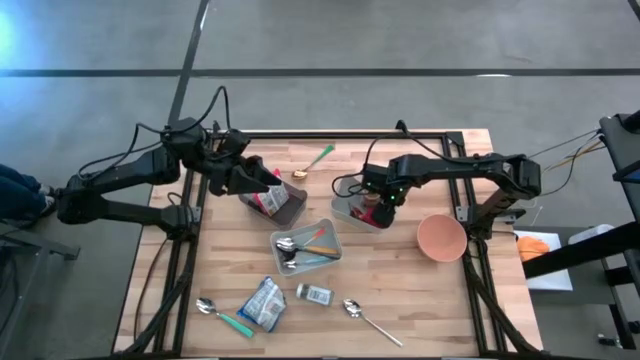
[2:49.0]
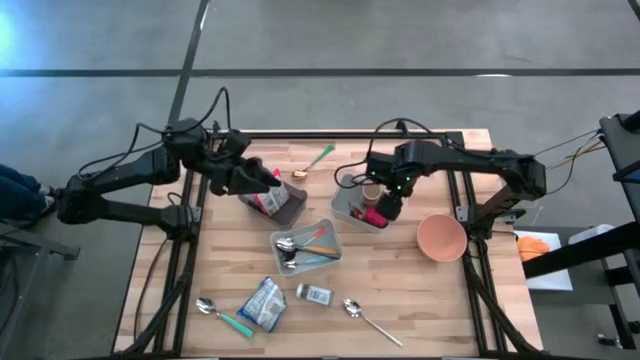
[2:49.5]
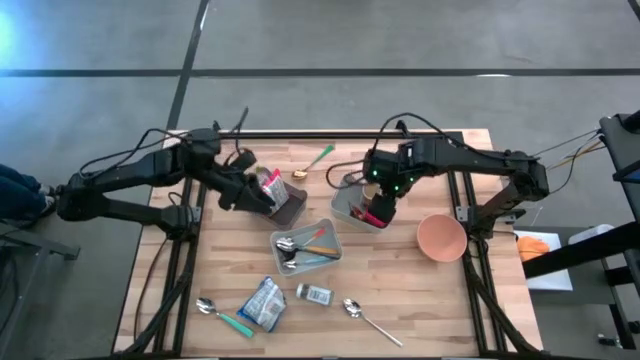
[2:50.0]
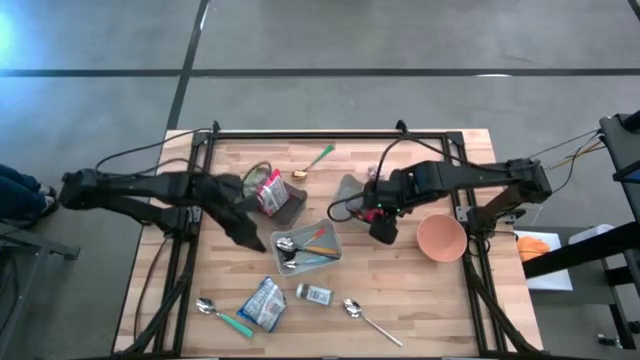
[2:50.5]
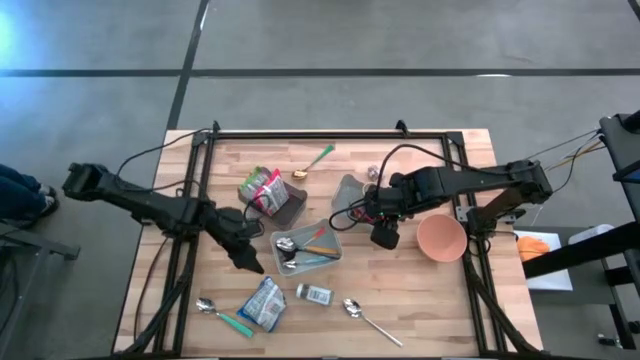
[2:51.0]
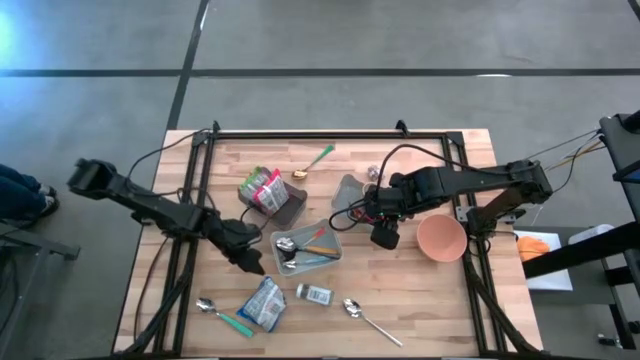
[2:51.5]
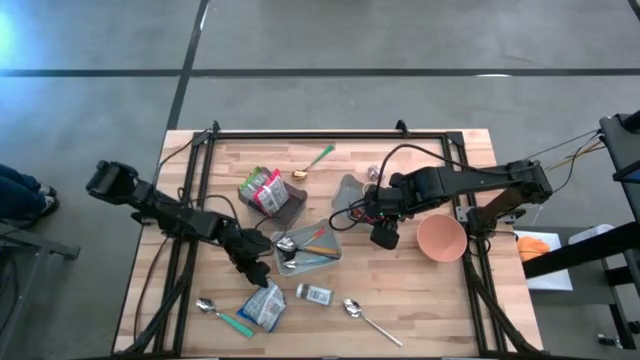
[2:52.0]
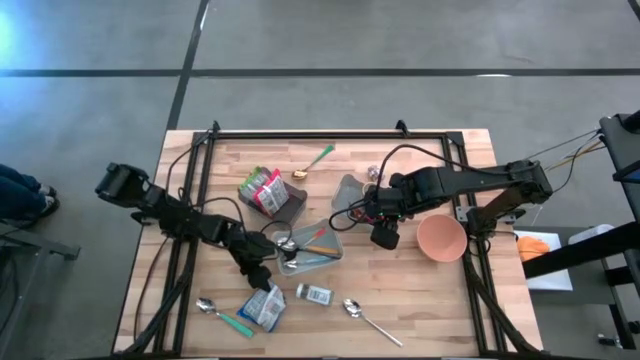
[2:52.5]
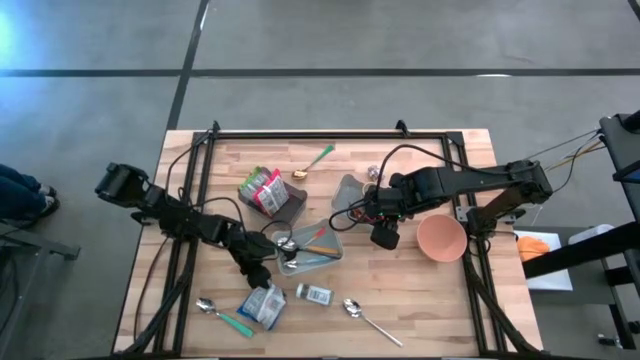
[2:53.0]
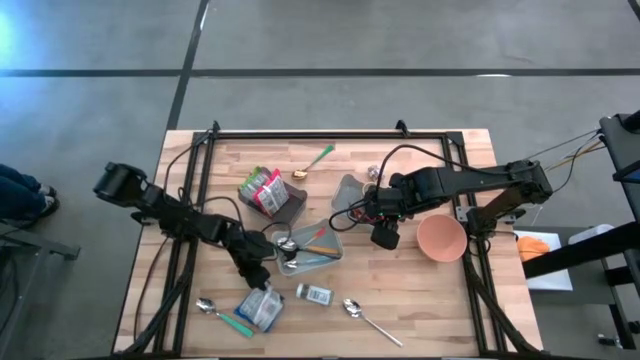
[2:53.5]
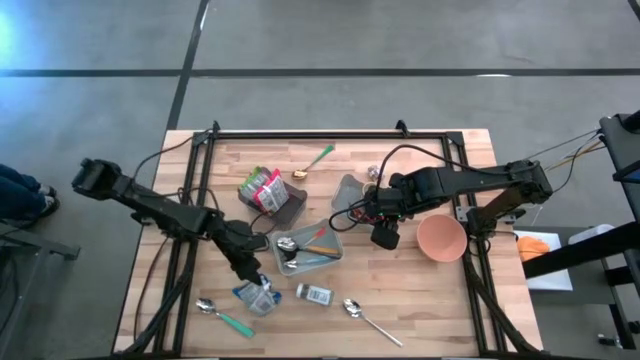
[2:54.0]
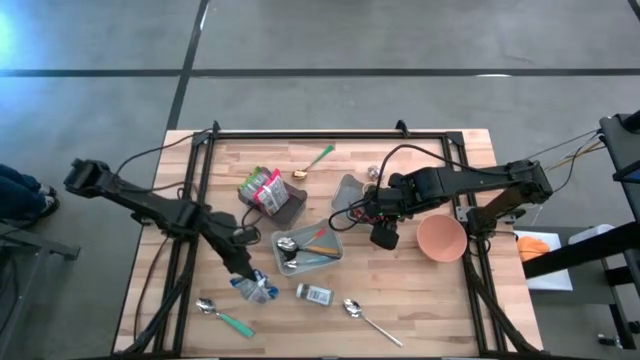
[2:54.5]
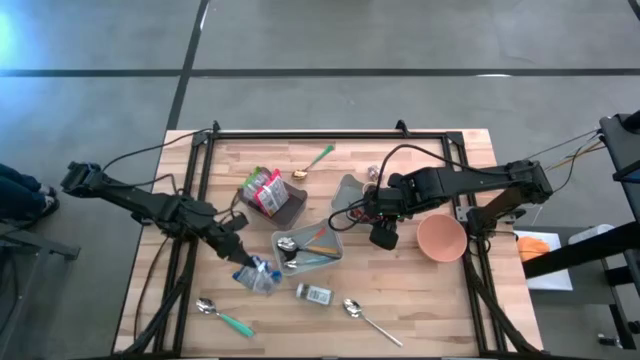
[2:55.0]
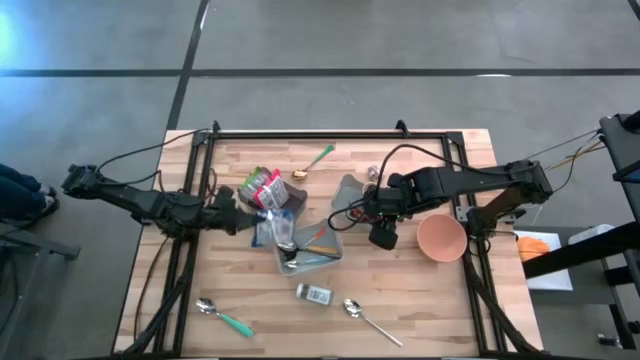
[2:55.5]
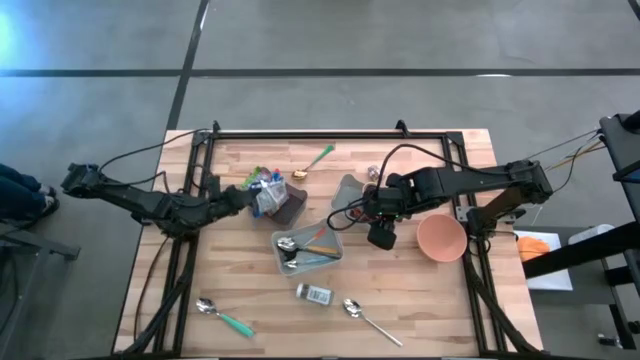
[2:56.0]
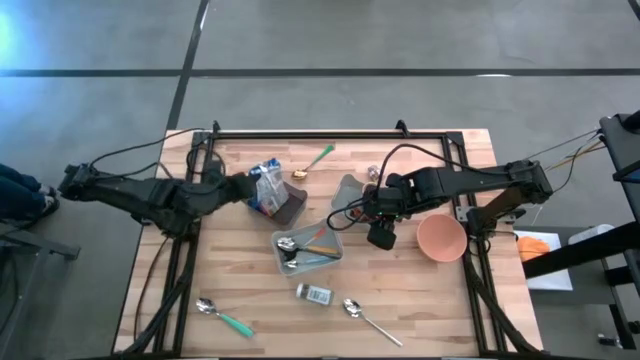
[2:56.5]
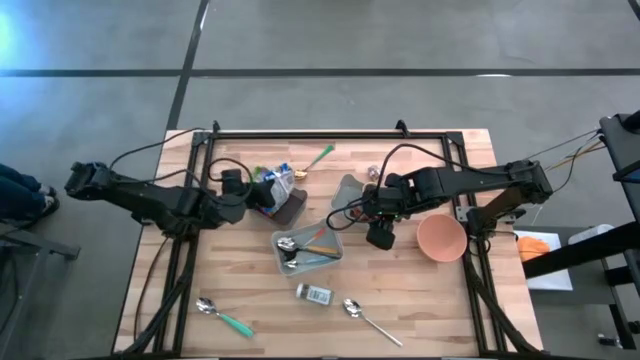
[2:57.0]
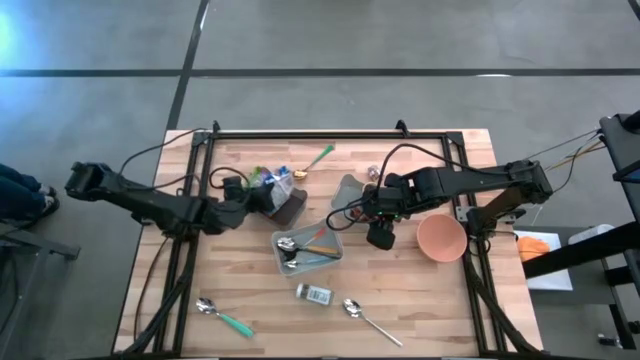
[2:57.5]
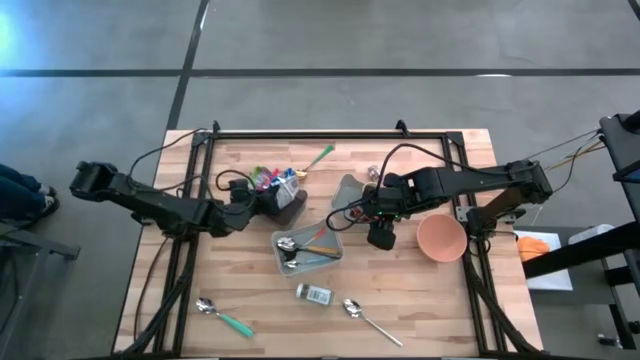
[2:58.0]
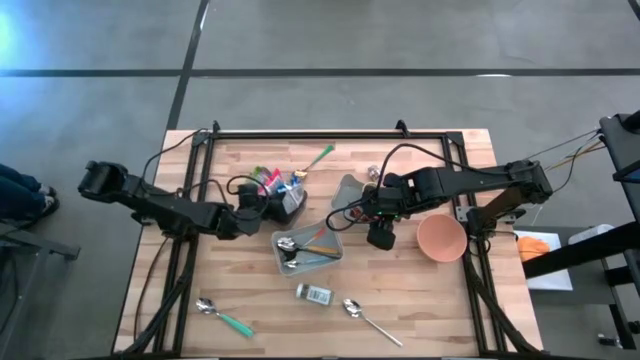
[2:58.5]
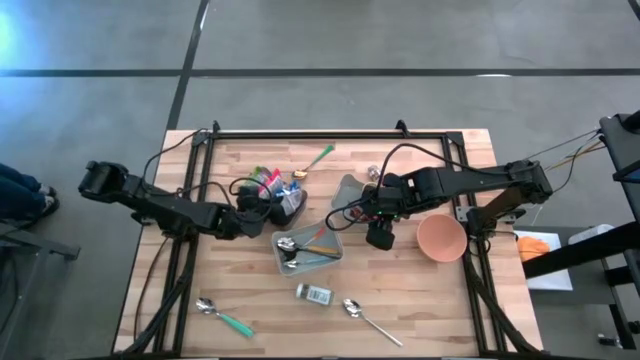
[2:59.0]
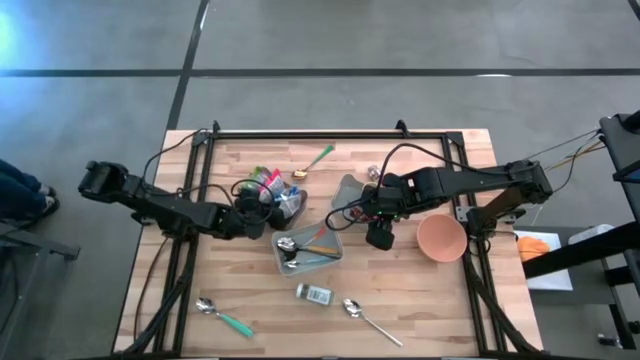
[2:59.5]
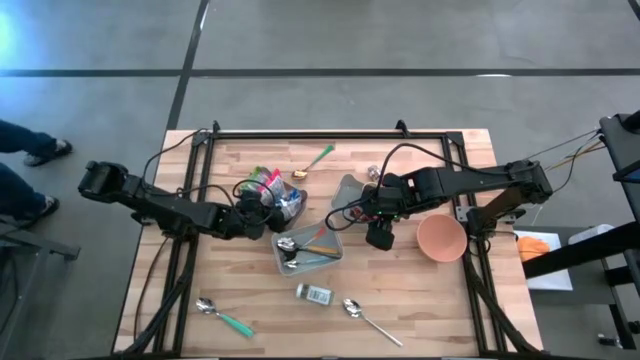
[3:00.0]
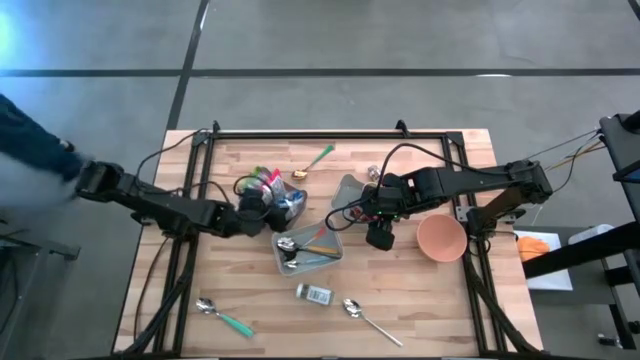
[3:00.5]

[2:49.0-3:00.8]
Put the blue noodle pack into the black bin

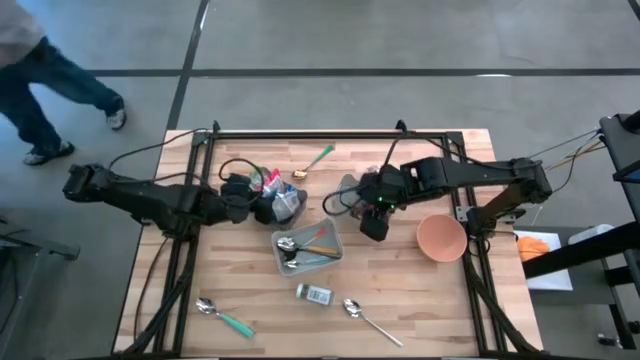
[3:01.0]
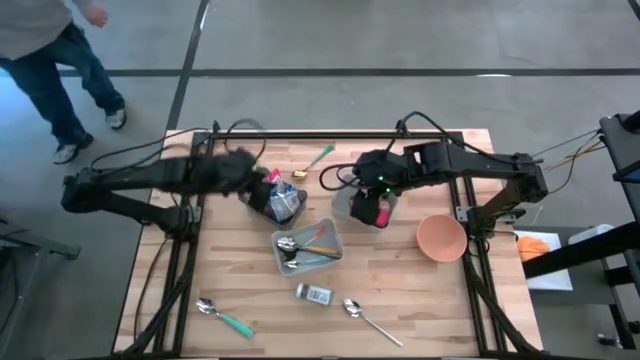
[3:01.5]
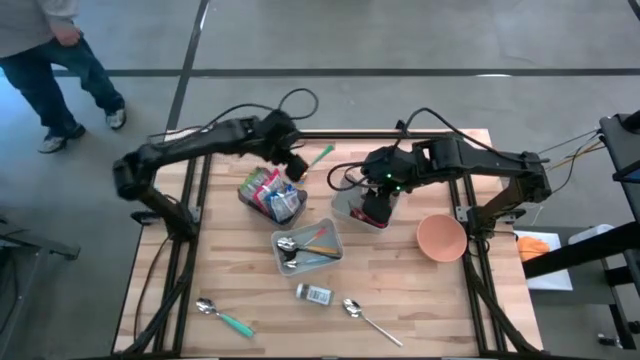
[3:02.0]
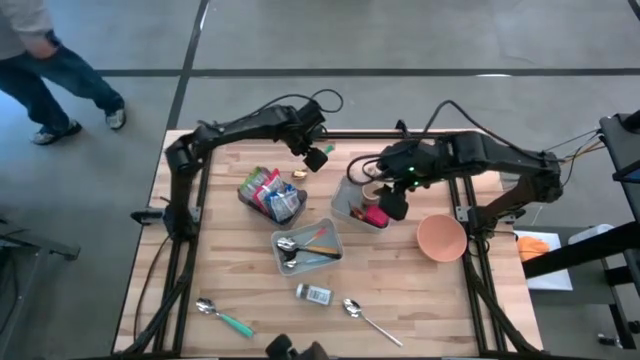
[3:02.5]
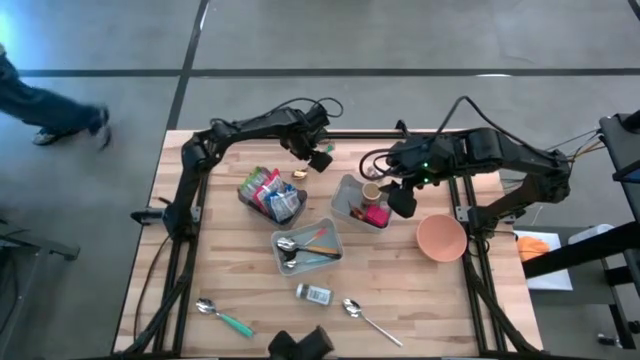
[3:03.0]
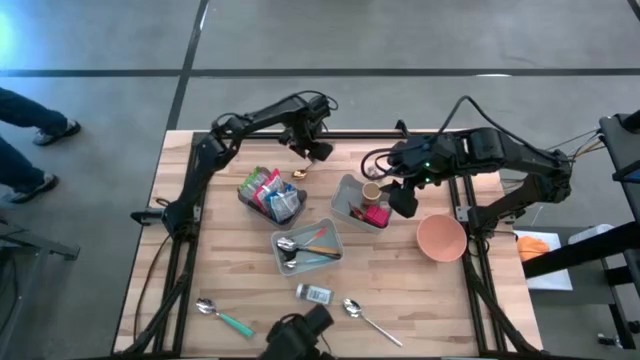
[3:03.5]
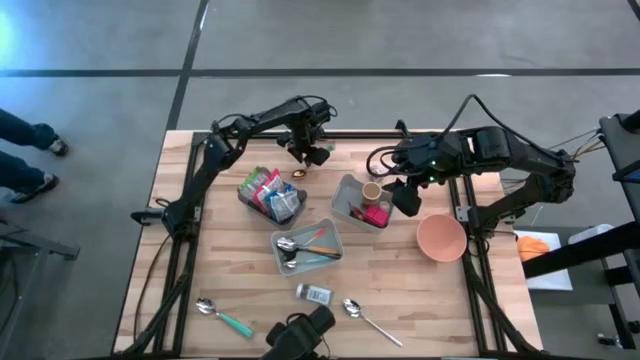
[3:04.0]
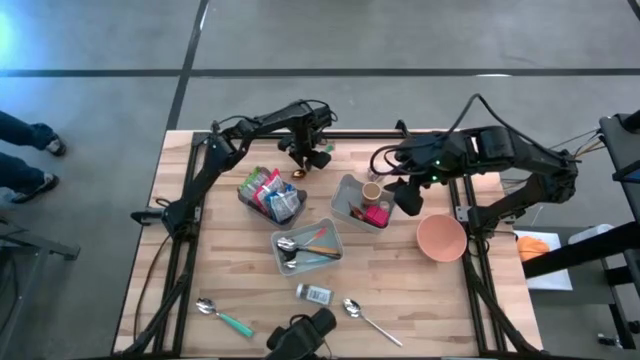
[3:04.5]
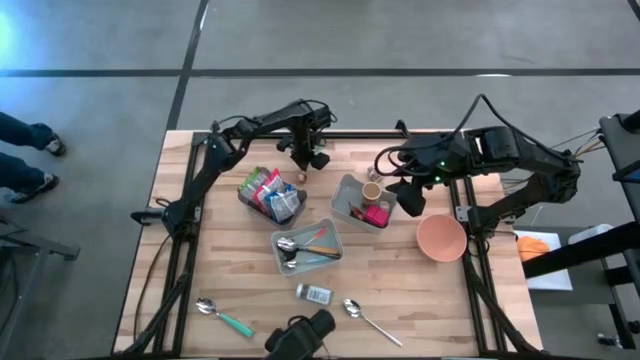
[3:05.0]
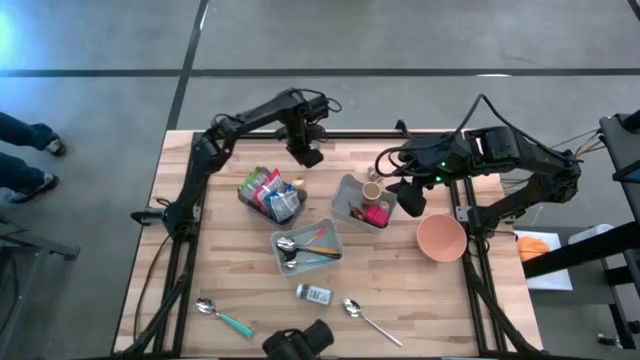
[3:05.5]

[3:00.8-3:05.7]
Put the green spoon into the bottom gray bin

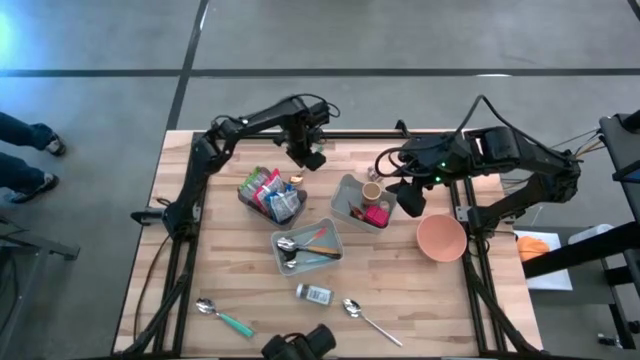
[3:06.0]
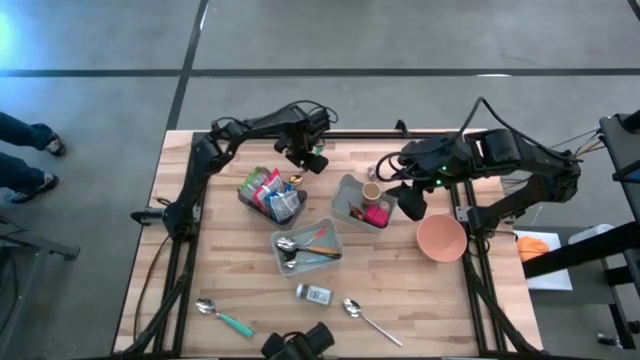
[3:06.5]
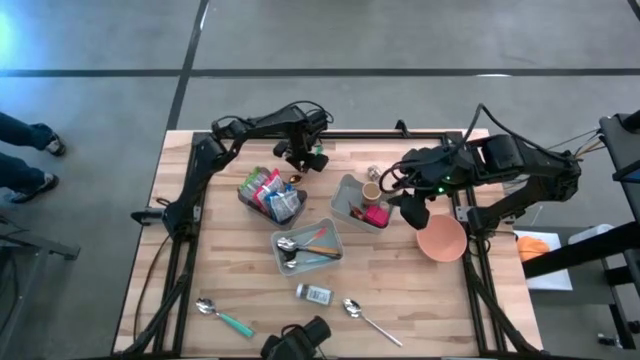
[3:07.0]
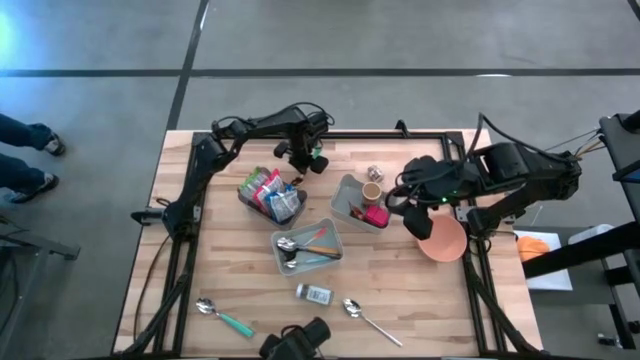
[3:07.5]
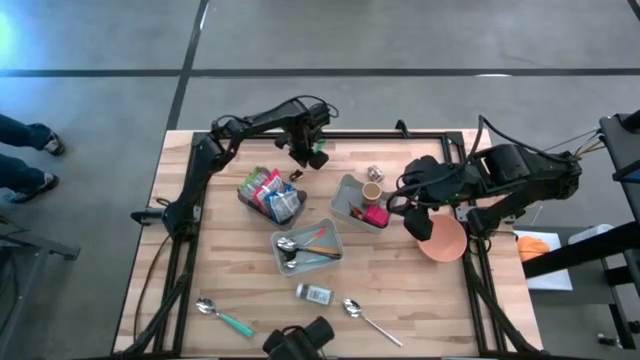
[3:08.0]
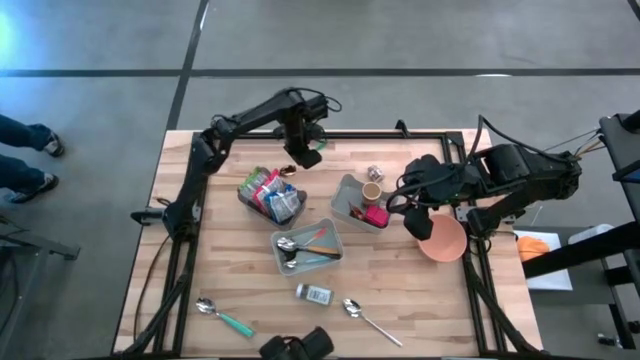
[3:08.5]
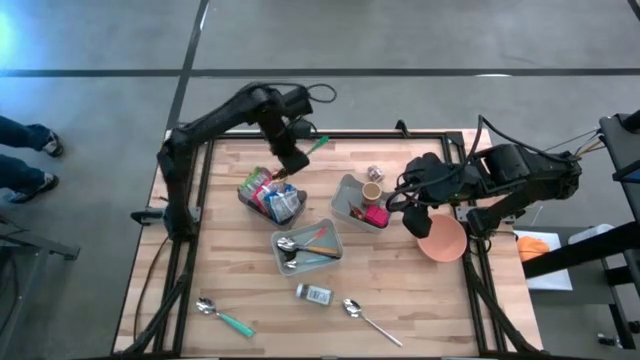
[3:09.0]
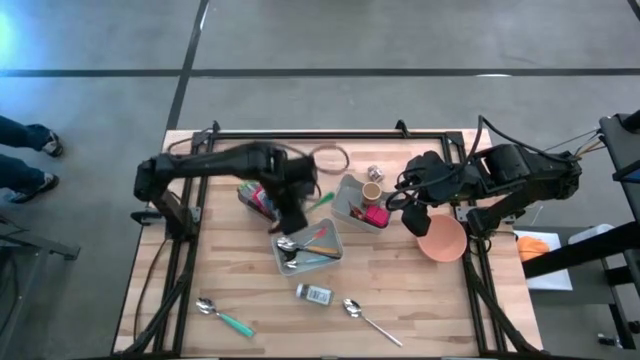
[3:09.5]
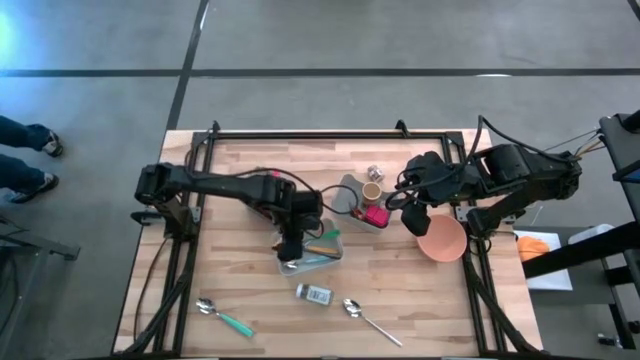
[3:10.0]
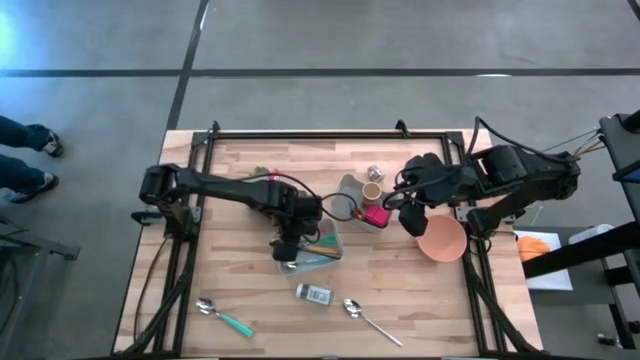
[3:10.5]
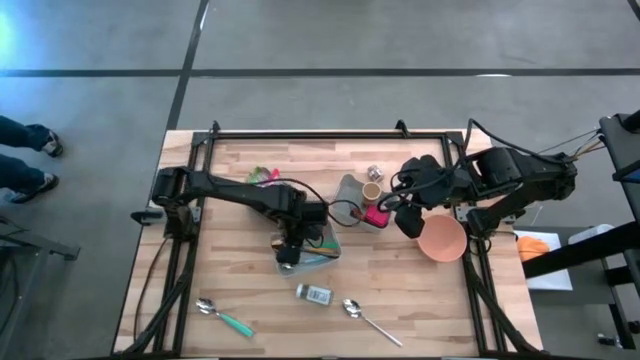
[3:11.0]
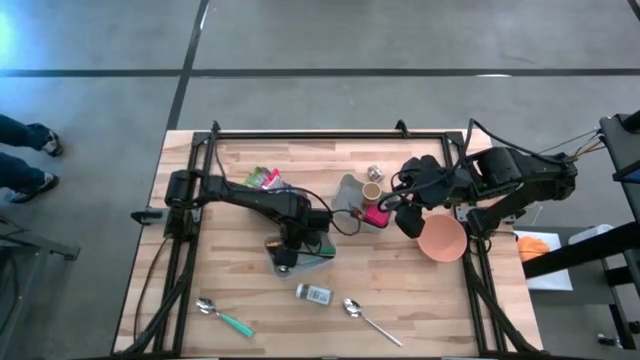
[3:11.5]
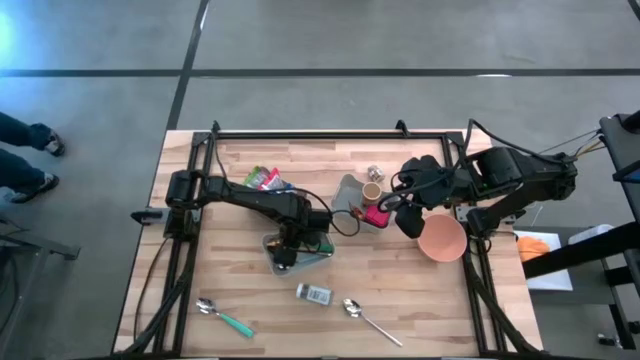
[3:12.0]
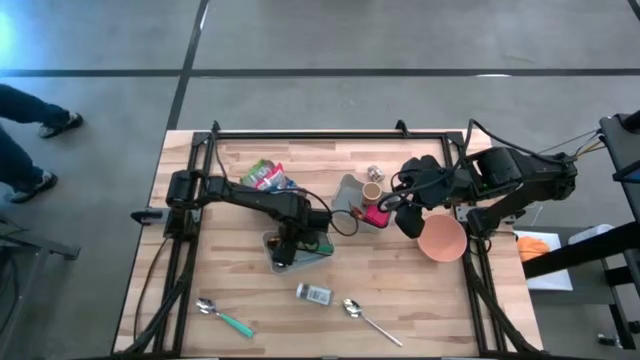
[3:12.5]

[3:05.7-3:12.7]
Put the green spoon into the bottom gray bin
